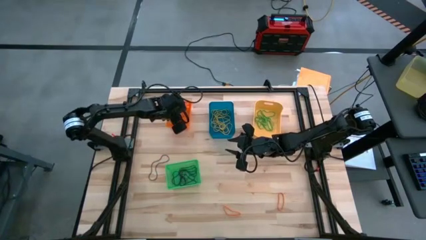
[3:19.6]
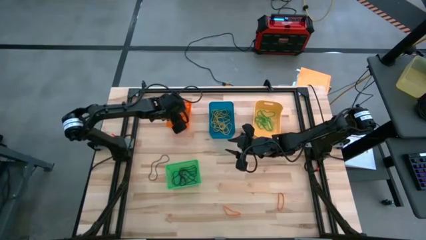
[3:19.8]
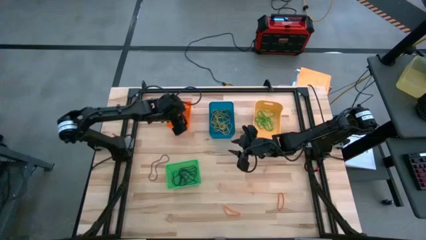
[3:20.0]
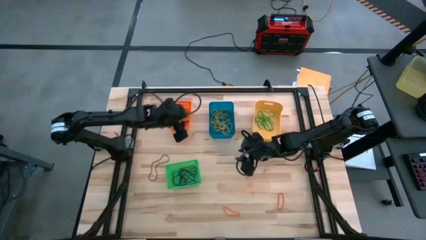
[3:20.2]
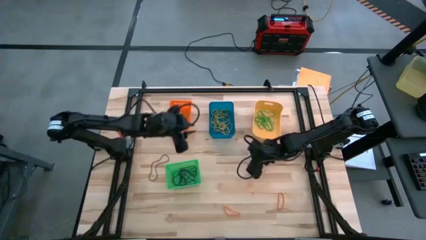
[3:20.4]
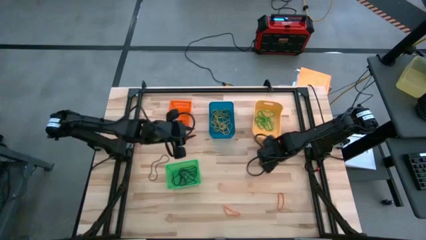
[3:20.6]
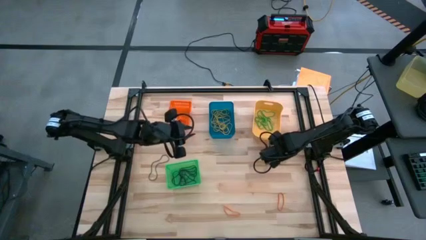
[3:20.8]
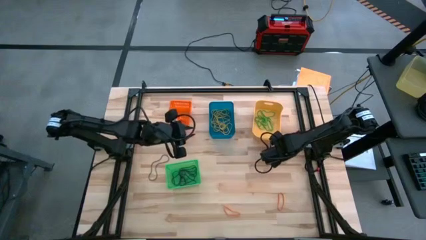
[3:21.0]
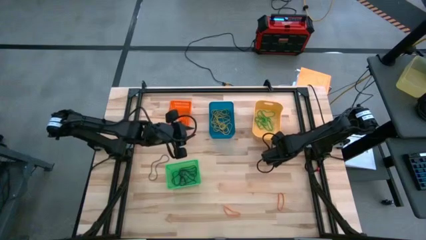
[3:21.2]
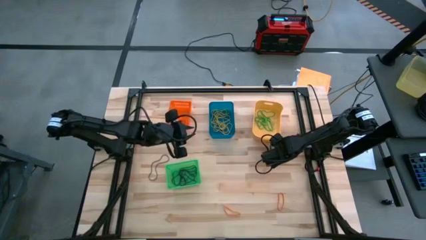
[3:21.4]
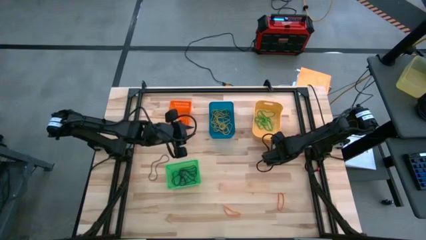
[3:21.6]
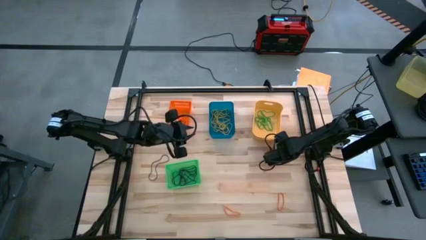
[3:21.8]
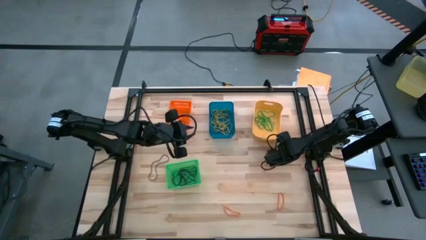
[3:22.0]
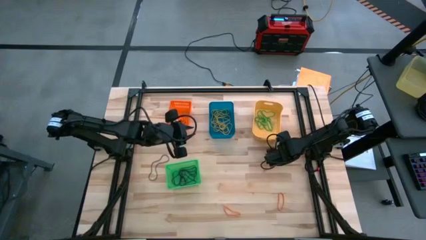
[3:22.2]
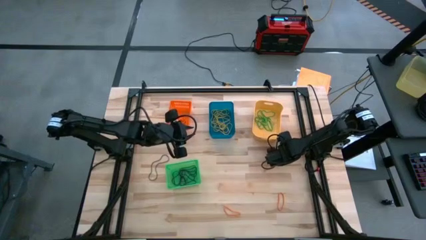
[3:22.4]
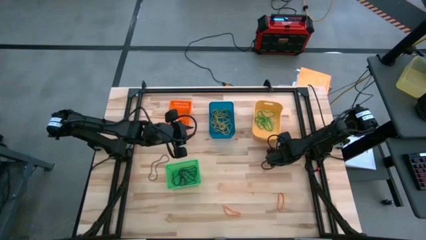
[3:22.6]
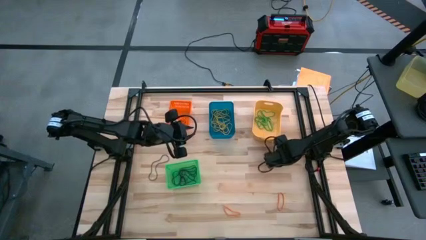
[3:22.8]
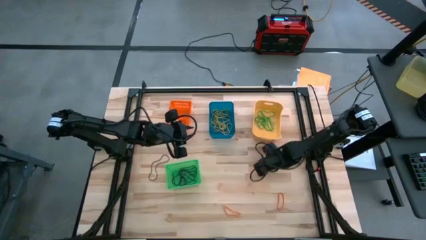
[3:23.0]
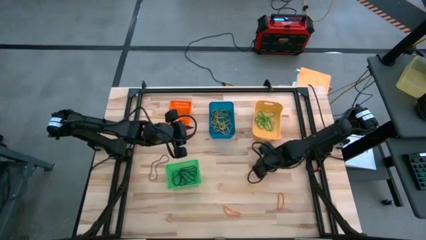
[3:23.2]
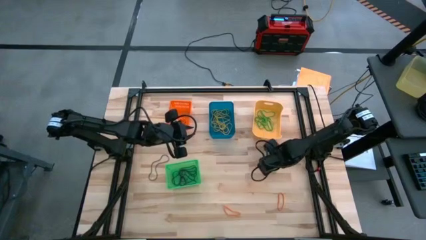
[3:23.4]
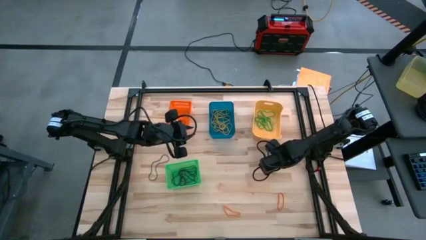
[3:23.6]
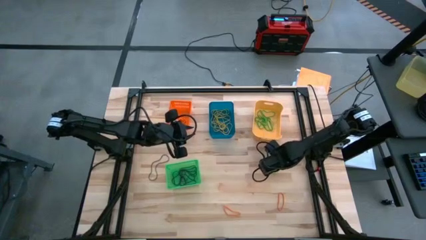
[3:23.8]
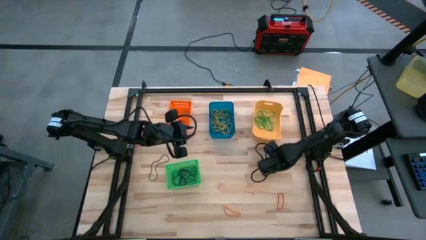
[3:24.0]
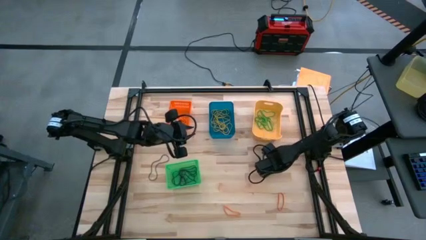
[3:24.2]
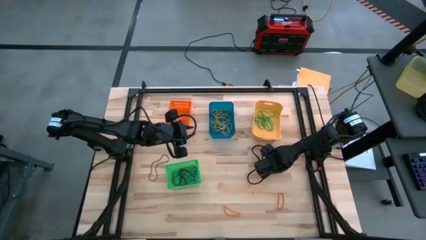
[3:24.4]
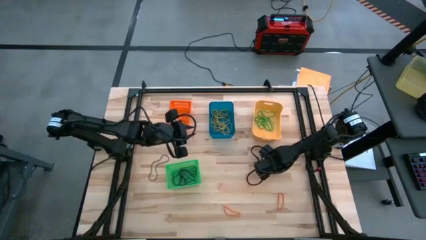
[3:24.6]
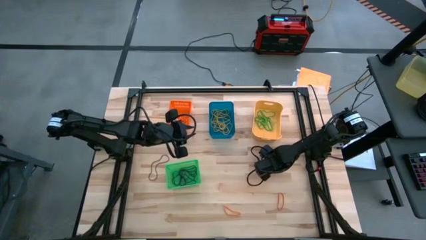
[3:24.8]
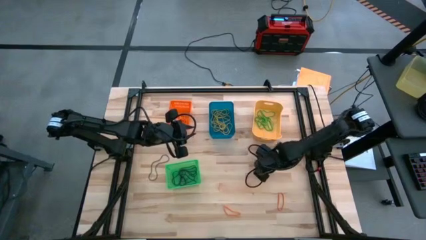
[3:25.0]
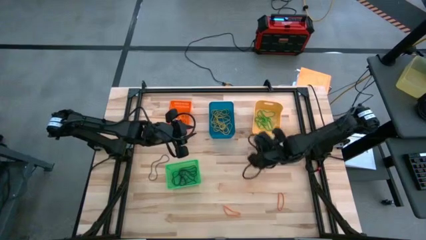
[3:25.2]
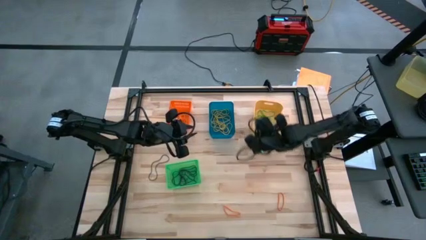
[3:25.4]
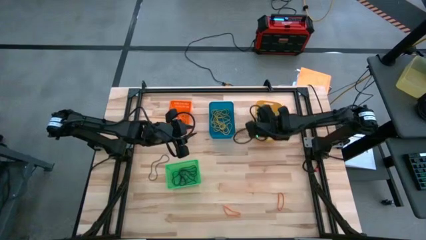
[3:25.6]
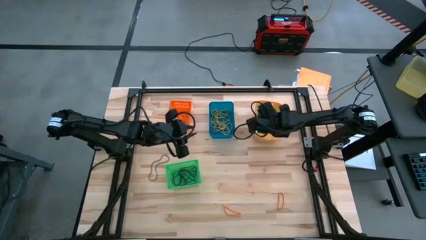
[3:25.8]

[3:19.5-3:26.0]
Task: Sort rubber bands into baskets
Put the green rubberband into the yellow bin

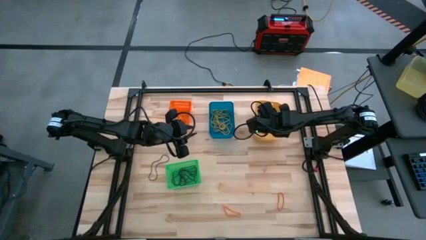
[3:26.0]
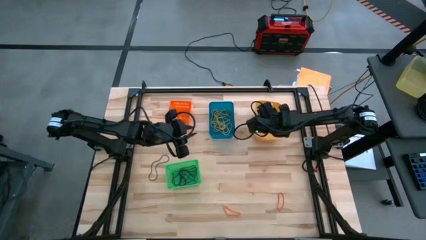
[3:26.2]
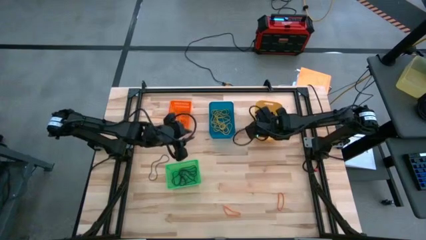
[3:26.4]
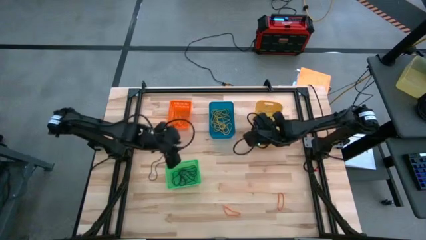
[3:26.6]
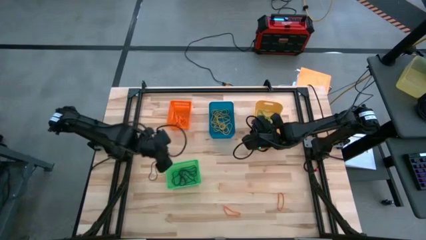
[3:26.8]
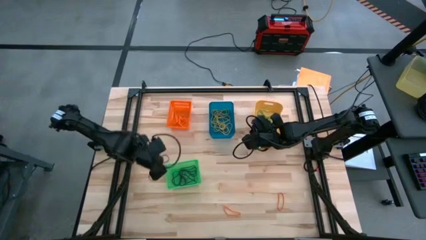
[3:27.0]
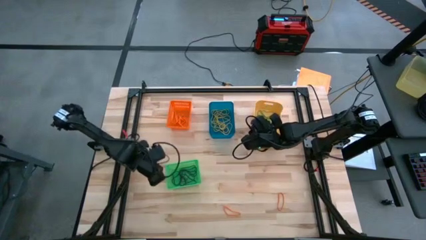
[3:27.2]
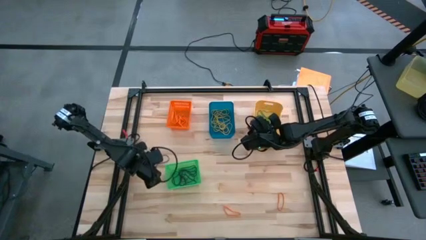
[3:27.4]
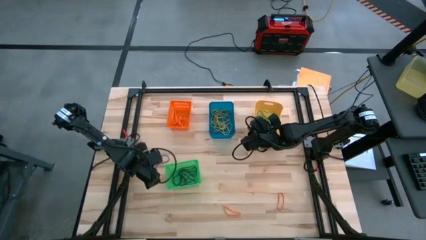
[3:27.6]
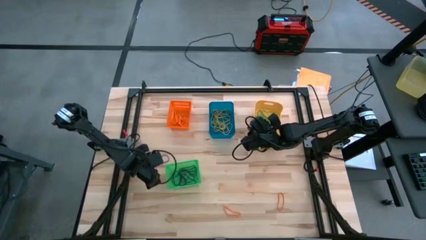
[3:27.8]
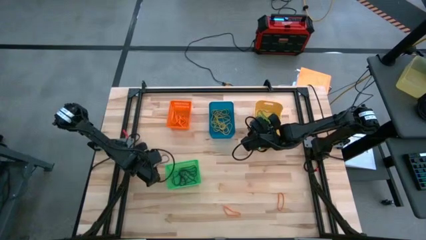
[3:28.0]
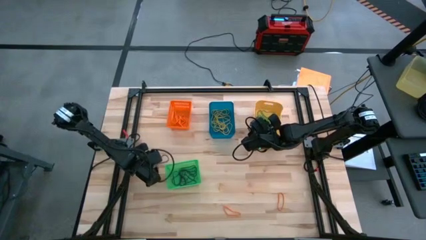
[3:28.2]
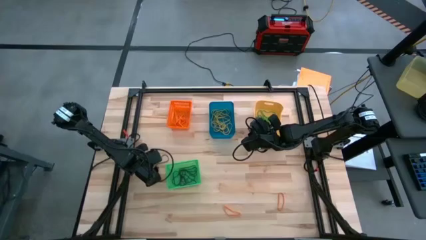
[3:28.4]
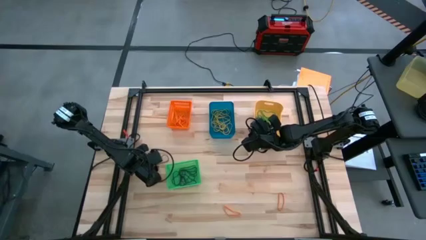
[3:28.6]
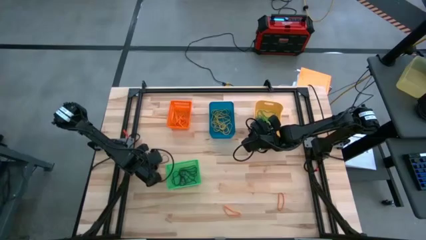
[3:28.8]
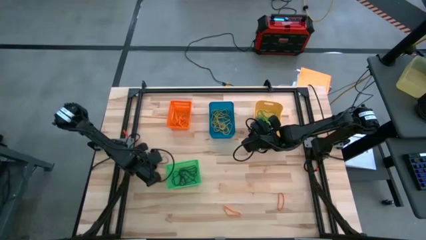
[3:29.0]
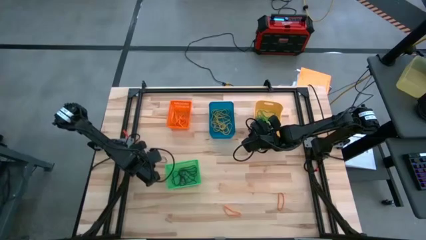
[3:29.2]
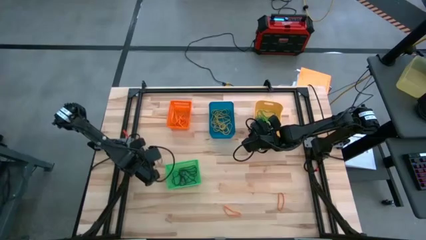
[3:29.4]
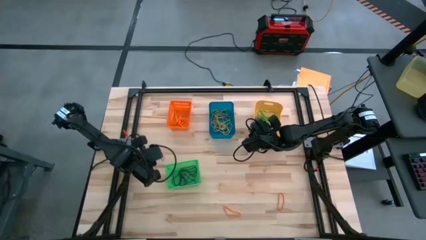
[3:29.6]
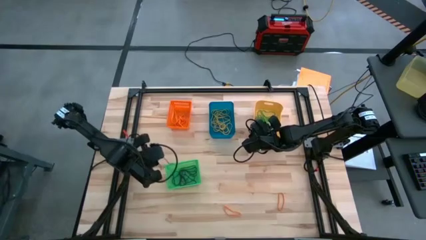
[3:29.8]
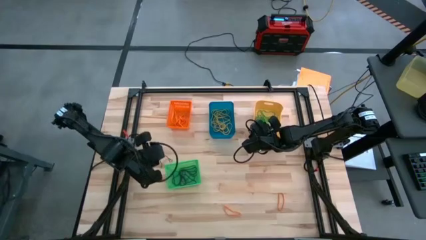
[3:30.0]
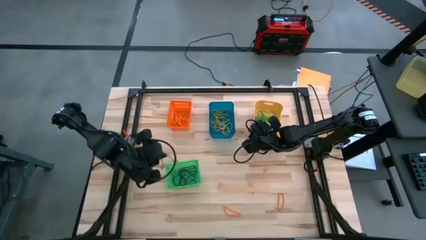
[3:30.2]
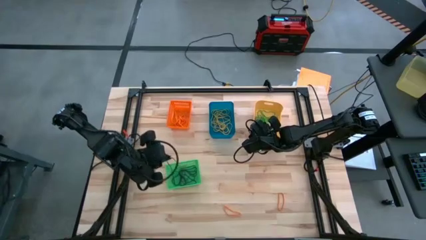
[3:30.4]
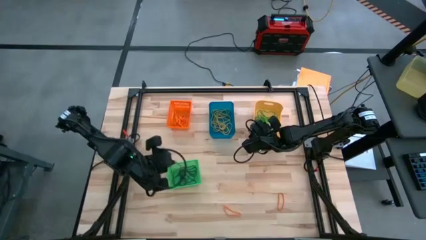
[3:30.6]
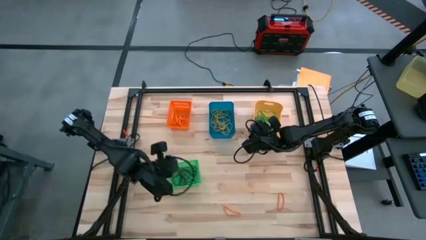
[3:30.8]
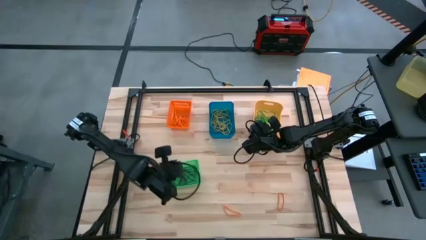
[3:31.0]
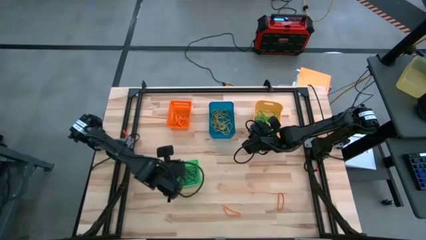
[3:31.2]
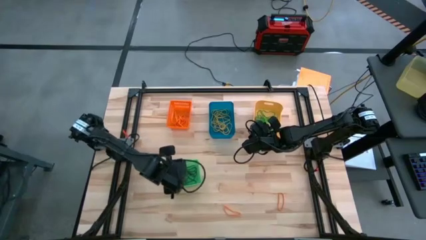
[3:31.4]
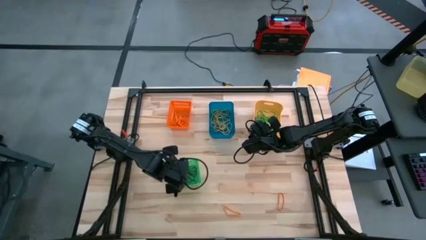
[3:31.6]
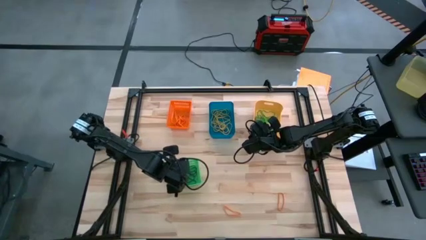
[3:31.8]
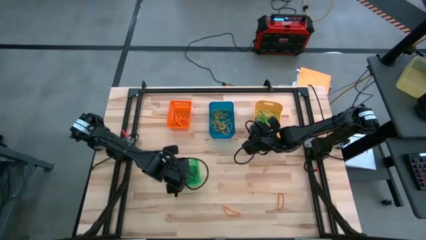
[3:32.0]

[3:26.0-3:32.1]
Put the violet rubberband into the green bin

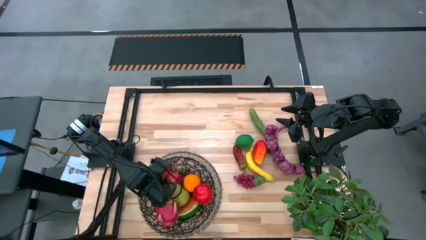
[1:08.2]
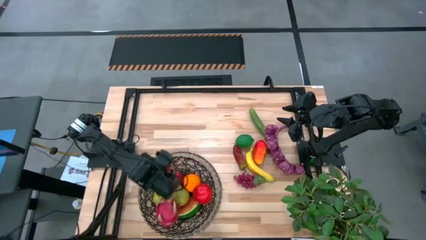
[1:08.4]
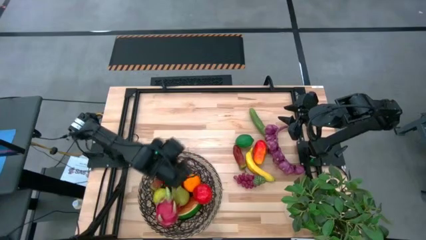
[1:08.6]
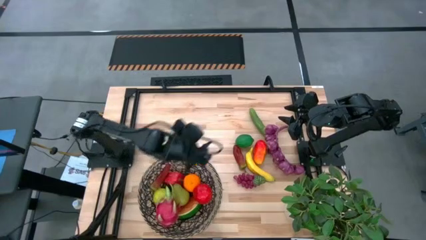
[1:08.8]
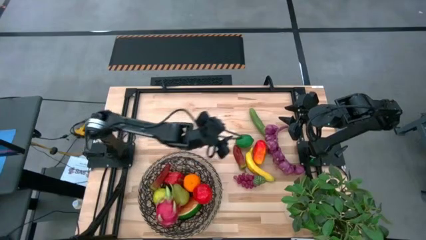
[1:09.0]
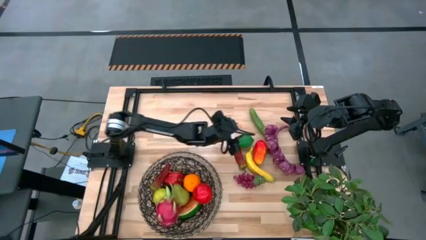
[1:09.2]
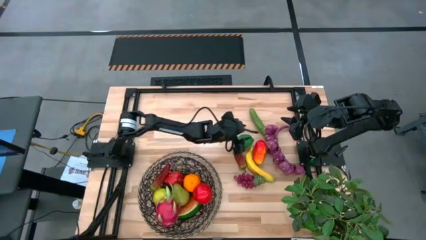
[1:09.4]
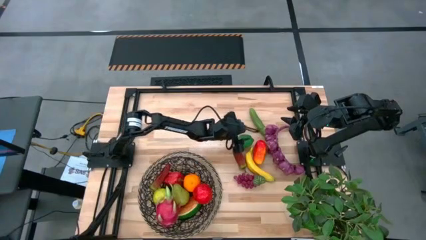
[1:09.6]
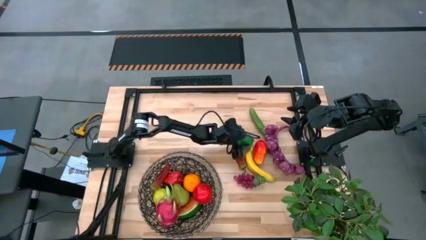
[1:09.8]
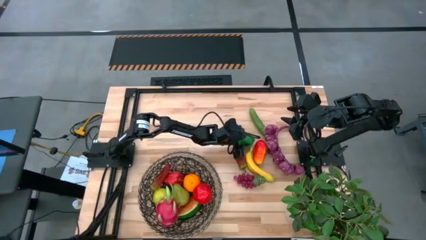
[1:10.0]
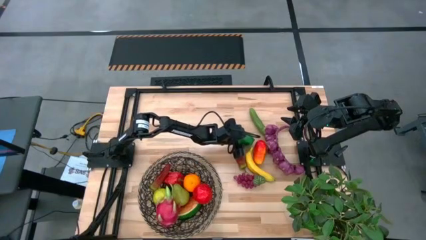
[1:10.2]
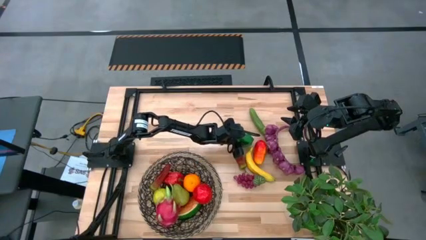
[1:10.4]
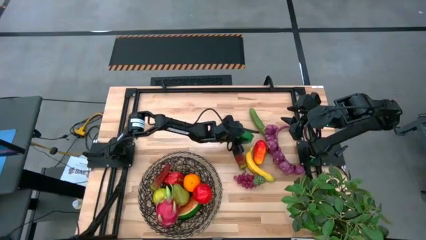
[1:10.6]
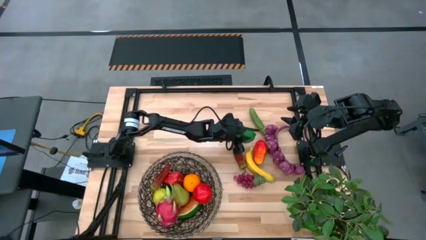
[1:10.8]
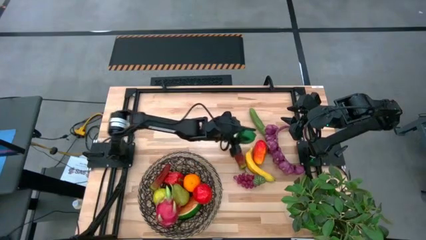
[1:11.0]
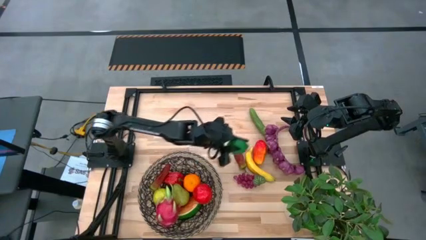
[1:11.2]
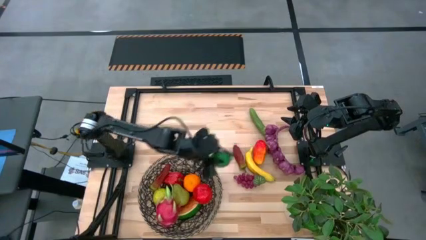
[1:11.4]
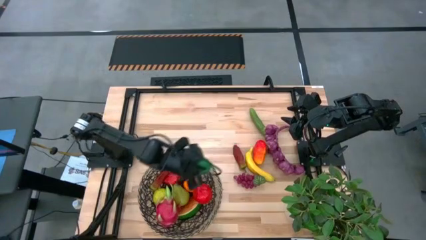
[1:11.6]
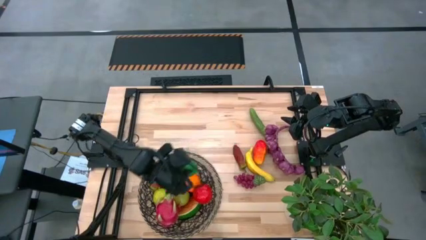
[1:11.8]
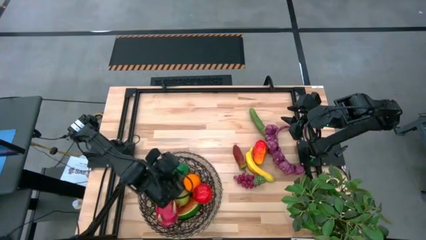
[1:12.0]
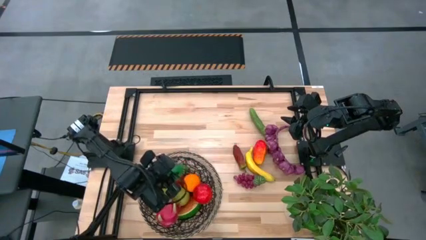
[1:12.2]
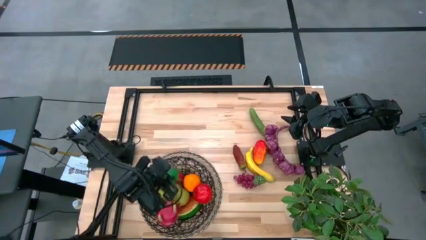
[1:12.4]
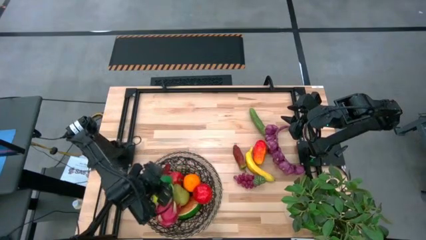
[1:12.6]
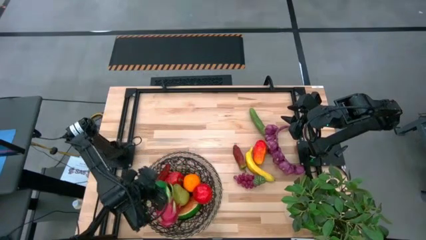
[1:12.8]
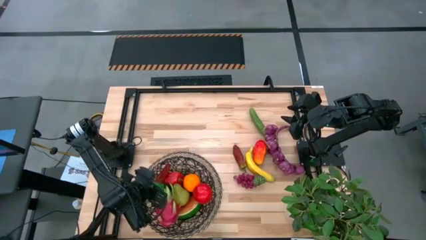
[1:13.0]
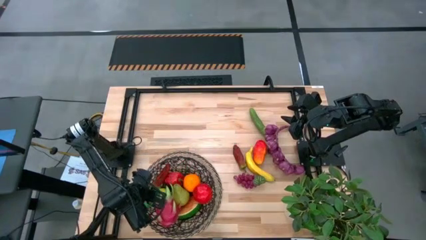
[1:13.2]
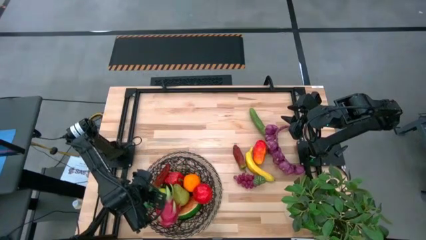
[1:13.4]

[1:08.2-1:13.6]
Task: Build produce basket
Put the lime into the woven basket
